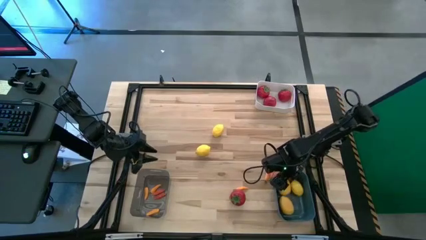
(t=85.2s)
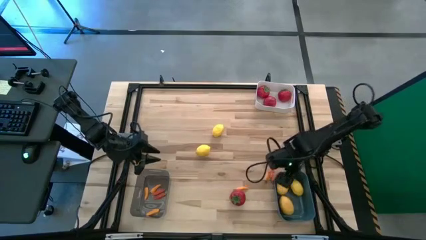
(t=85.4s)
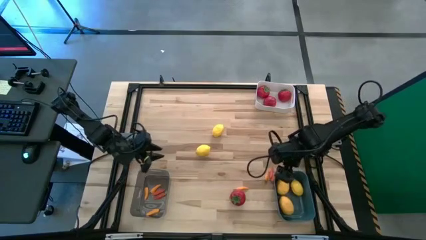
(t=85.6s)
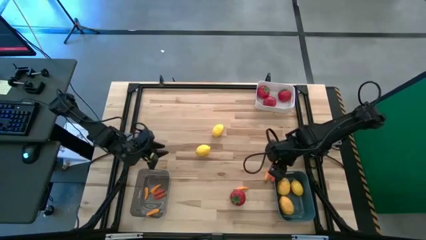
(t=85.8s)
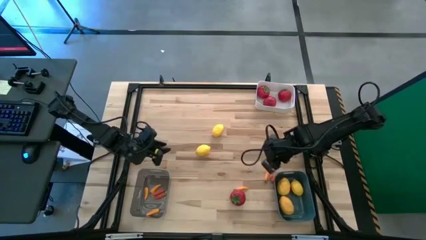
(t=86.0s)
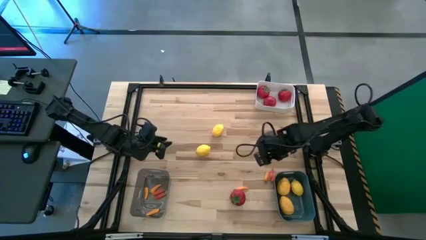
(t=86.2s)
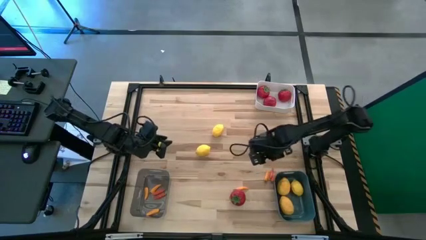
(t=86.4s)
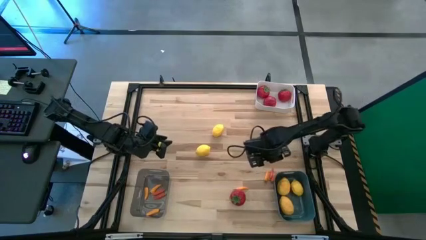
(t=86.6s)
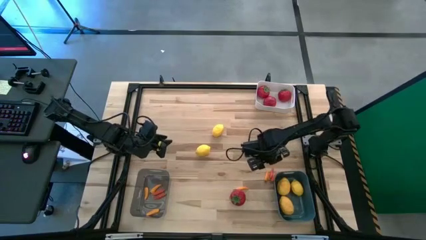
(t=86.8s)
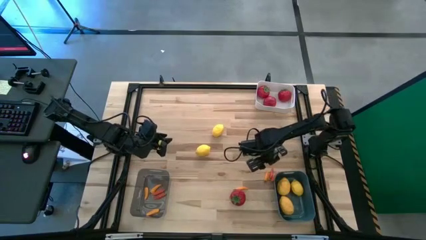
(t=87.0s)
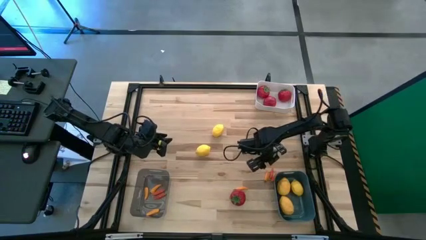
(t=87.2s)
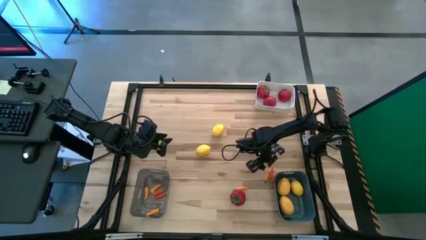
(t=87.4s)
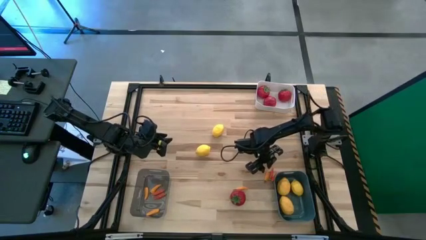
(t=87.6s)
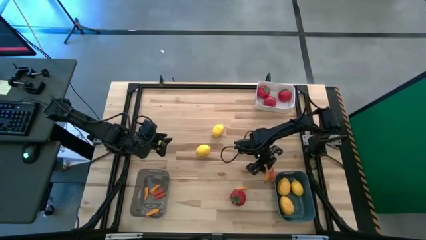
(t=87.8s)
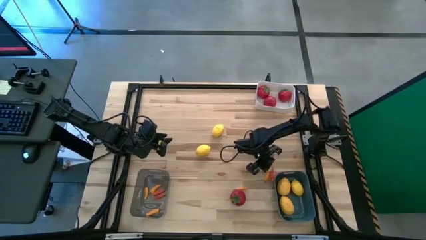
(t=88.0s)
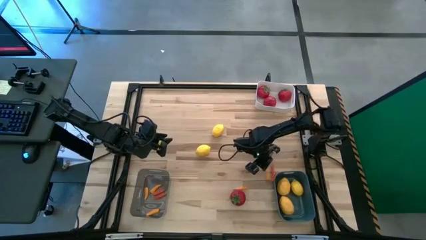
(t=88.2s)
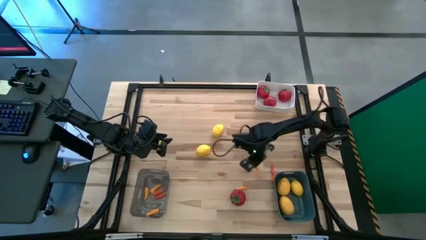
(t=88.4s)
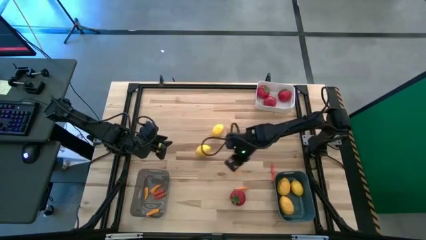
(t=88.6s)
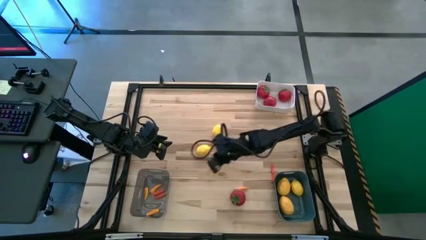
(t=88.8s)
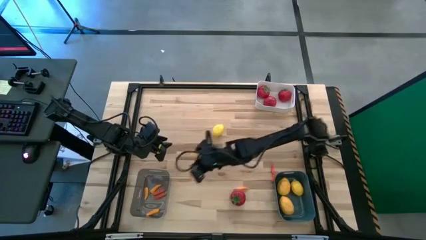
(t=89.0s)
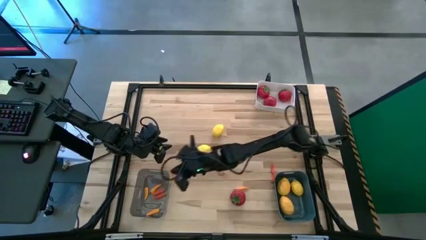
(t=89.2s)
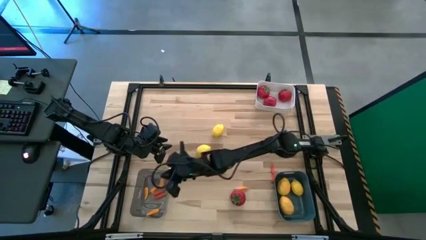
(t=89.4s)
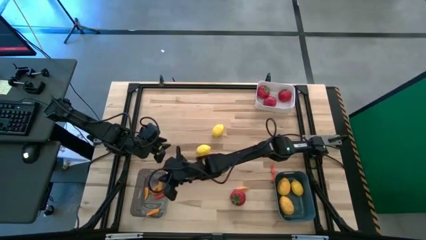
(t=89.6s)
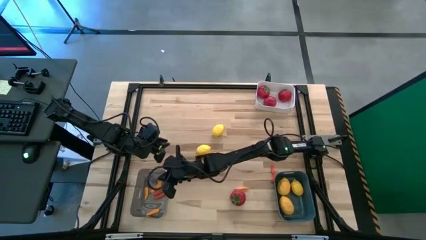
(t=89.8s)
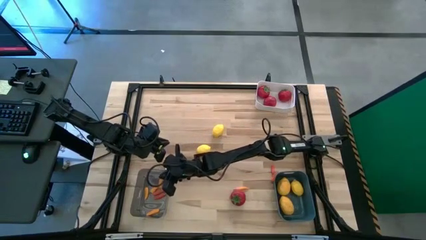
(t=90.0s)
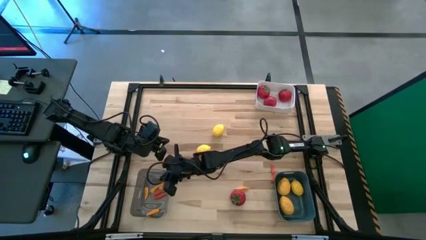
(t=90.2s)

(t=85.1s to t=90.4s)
Task: Sort produce into baskets
Put the yellow chili pepper into the black bin

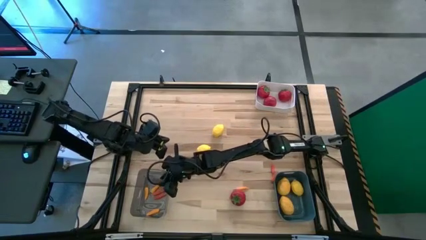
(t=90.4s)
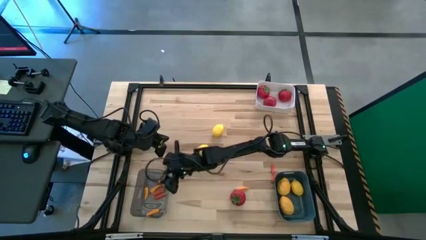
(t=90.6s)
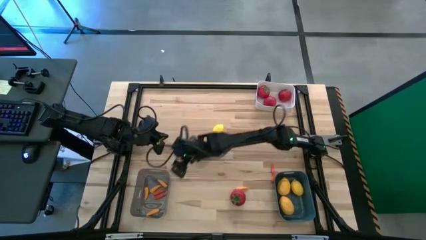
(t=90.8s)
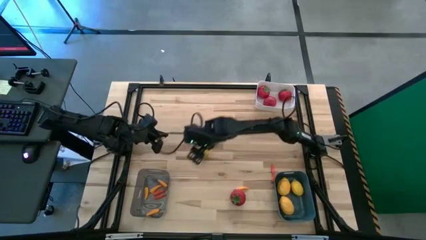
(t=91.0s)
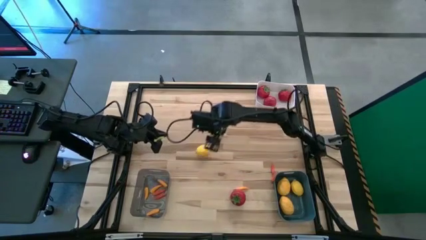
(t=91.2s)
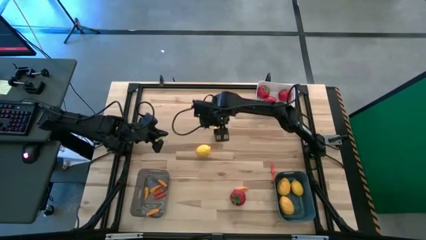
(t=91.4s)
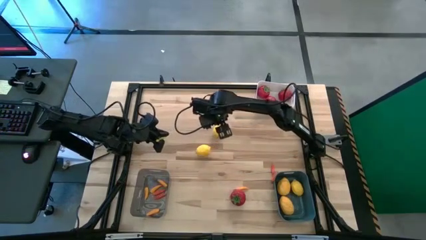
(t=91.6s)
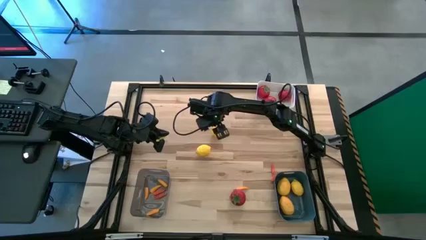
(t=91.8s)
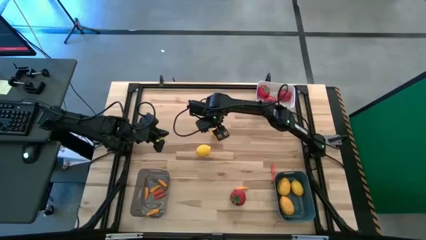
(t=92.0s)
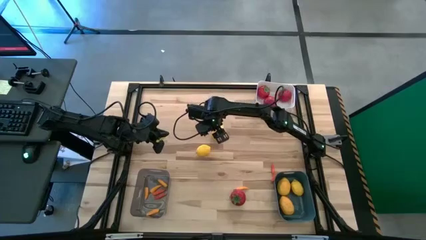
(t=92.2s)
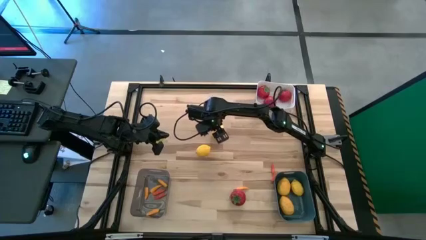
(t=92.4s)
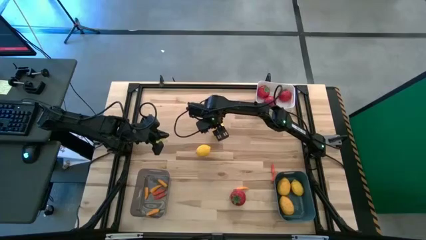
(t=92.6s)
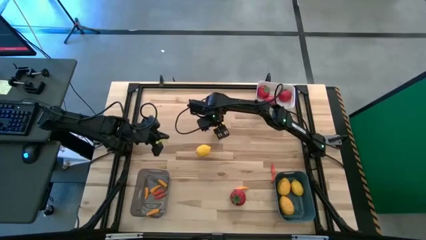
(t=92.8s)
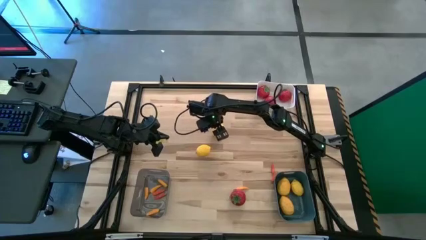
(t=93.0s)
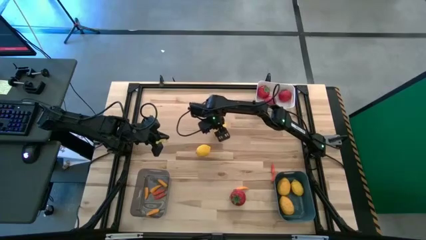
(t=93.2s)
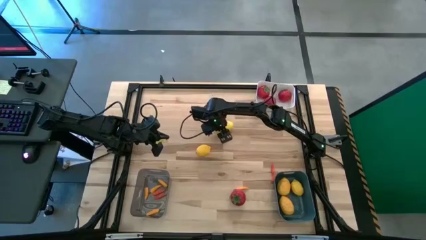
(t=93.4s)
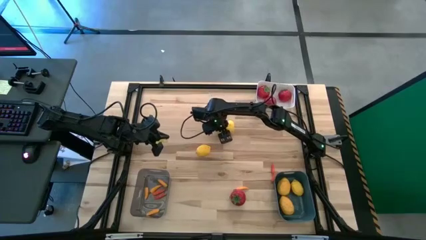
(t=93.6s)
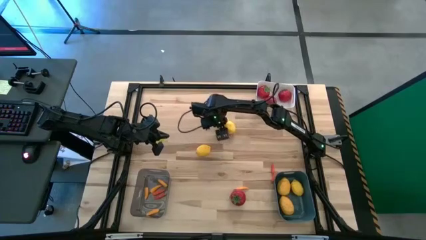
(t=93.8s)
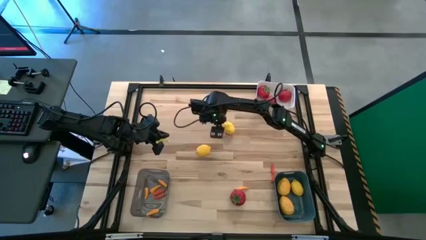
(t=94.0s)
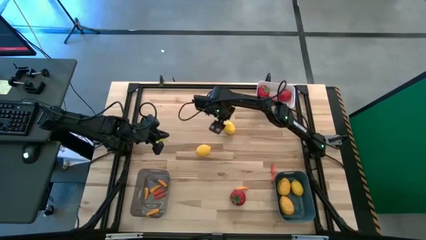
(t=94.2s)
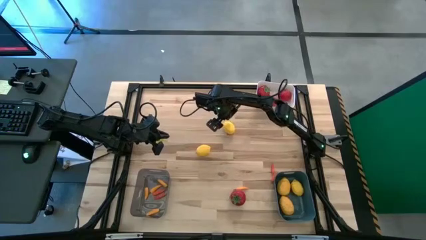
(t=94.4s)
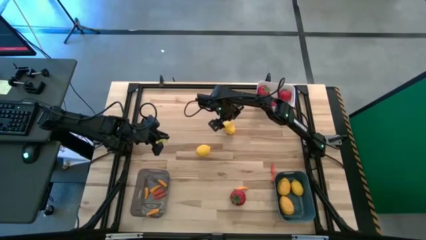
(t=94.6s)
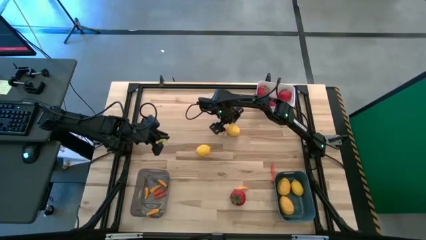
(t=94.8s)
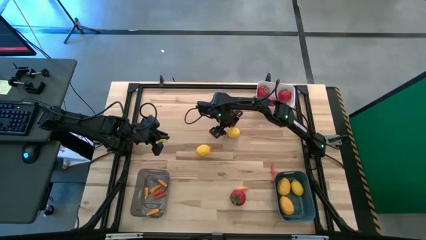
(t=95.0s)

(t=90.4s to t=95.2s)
Put the lemon into the blue bin

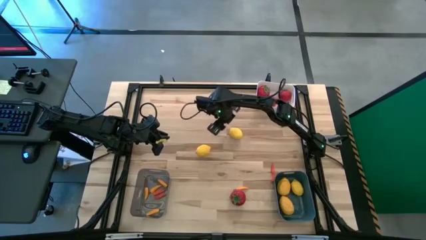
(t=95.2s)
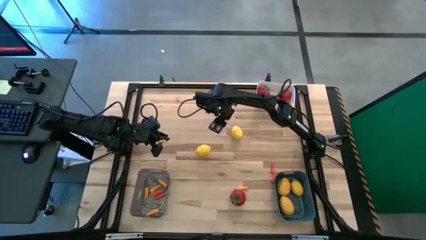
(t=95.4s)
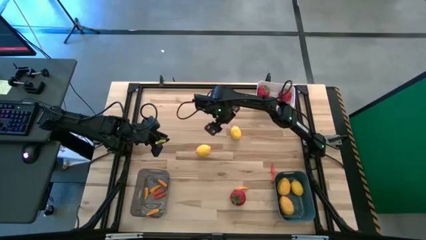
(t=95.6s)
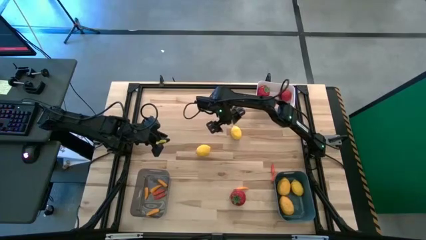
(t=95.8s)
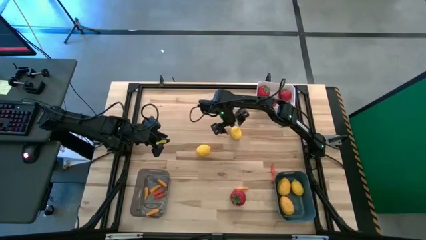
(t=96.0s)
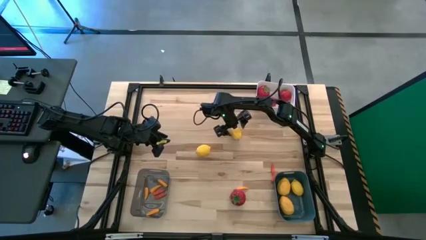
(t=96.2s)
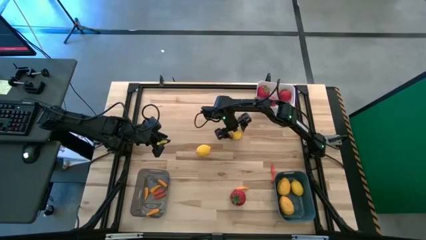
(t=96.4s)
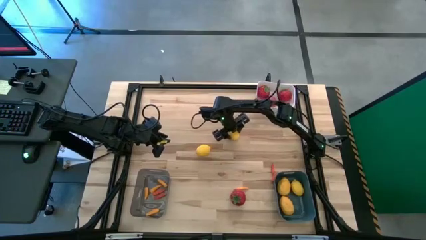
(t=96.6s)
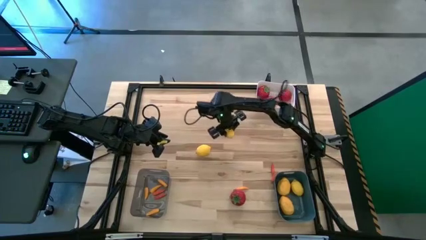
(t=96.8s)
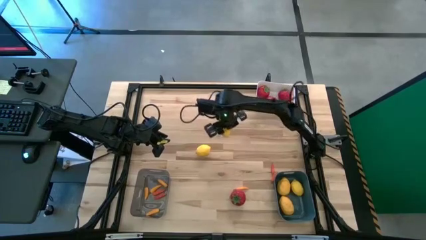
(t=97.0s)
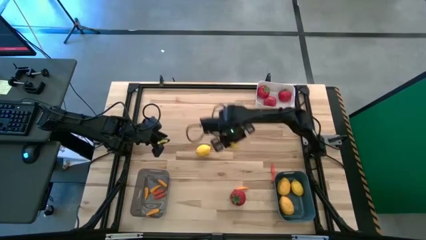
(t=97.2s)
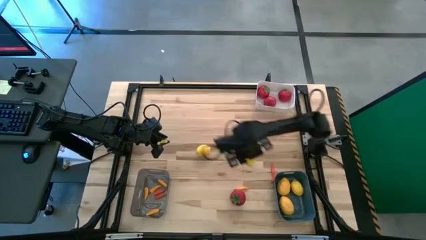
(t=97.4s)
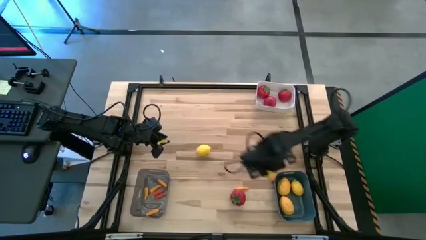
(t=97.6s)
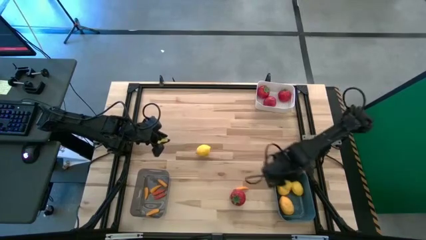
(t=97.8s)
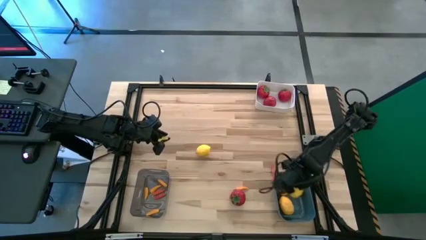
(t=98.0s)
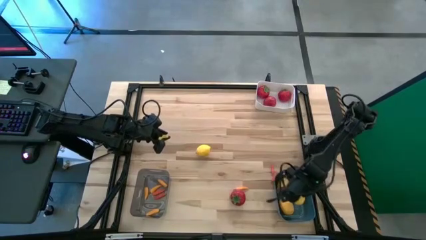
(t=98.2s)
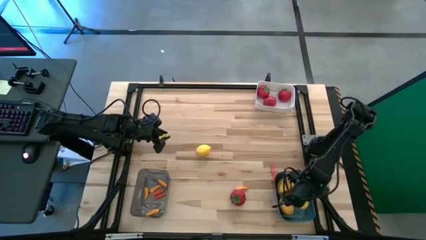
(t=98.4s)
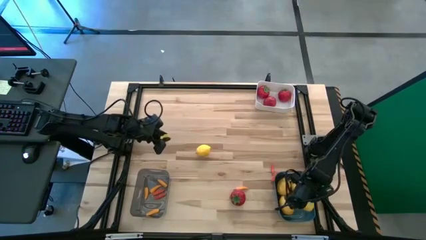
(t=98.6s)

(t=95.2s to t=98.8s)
Put the lemon into the blue bin
